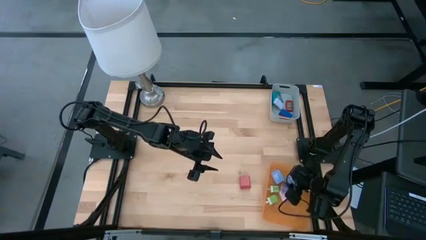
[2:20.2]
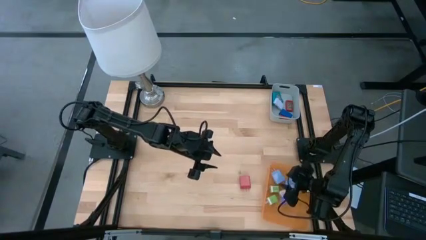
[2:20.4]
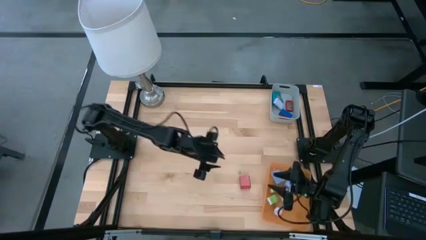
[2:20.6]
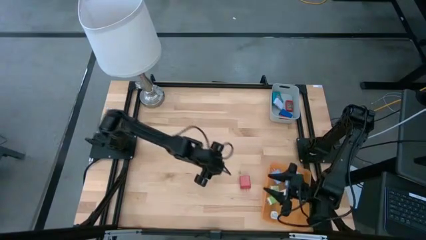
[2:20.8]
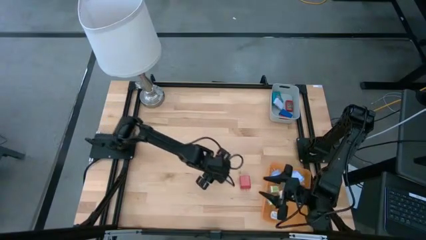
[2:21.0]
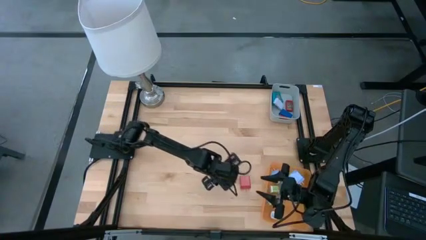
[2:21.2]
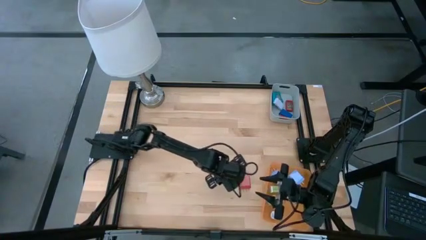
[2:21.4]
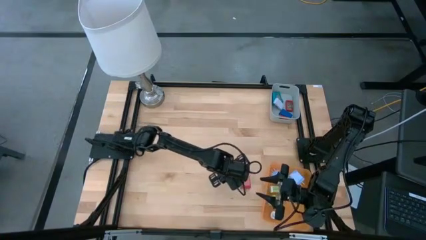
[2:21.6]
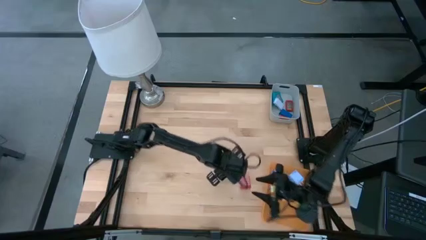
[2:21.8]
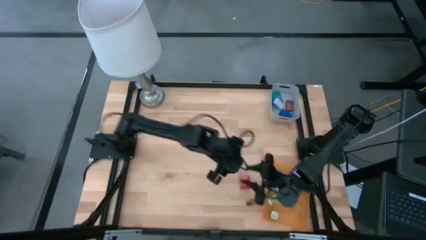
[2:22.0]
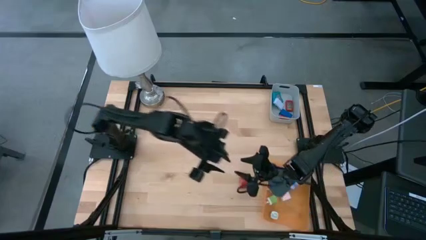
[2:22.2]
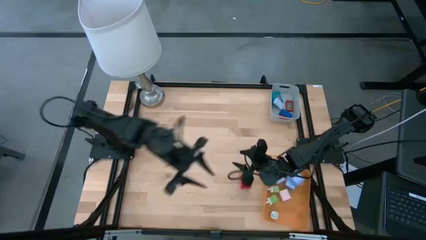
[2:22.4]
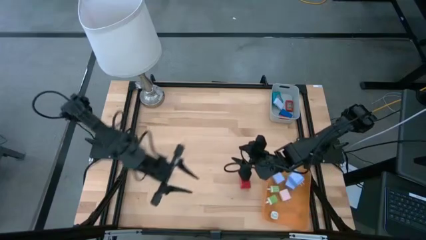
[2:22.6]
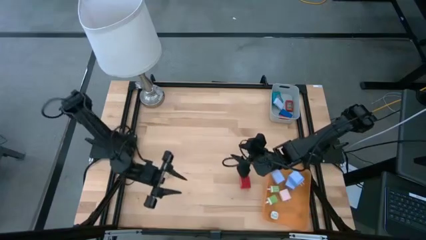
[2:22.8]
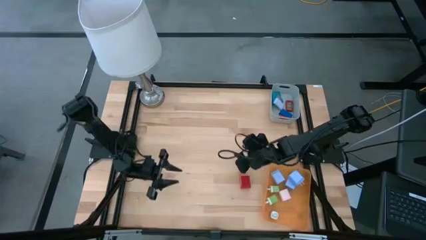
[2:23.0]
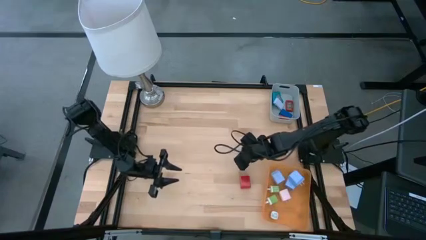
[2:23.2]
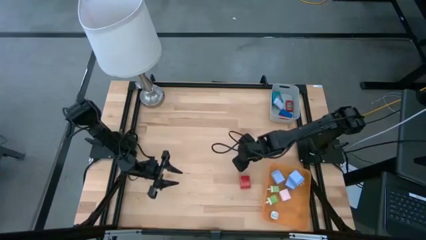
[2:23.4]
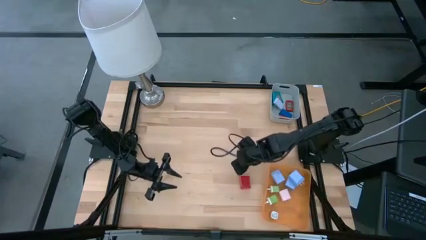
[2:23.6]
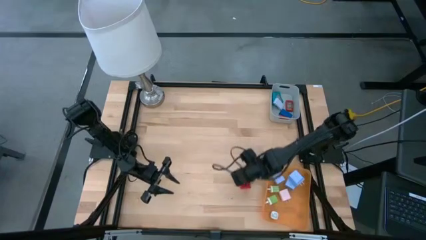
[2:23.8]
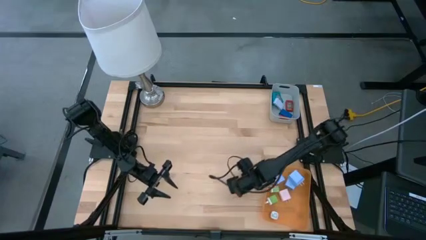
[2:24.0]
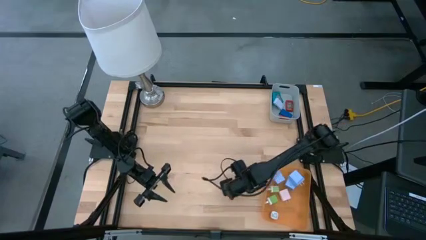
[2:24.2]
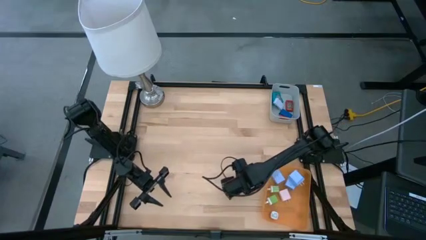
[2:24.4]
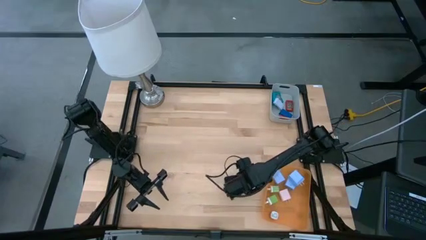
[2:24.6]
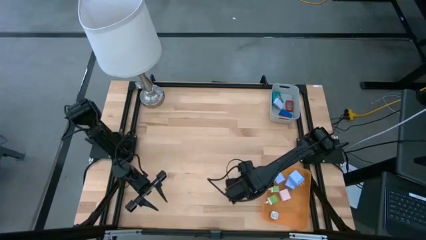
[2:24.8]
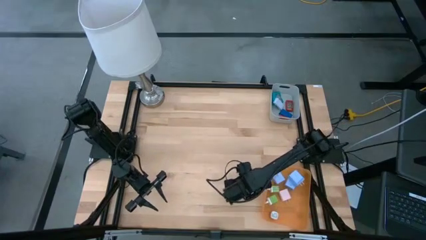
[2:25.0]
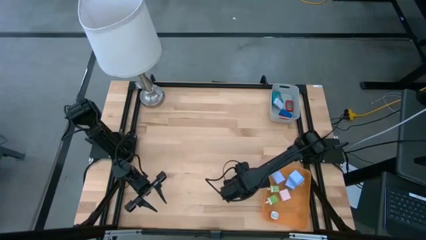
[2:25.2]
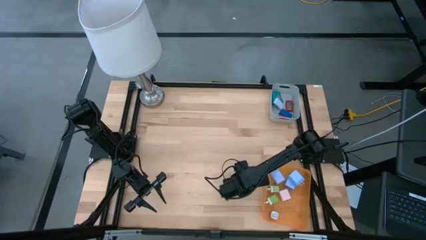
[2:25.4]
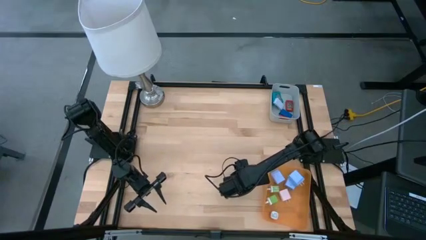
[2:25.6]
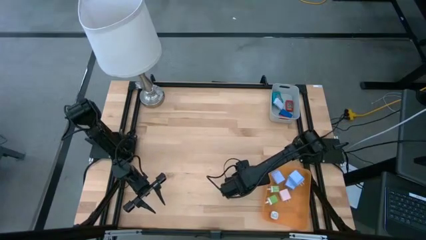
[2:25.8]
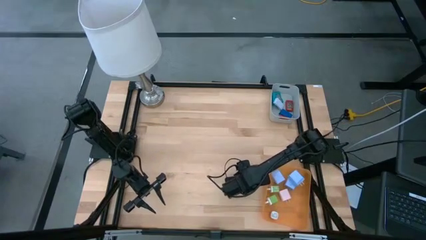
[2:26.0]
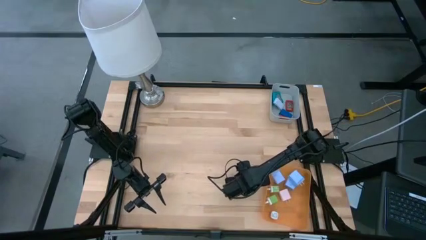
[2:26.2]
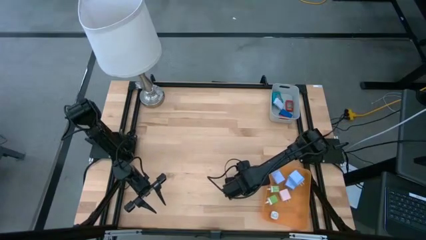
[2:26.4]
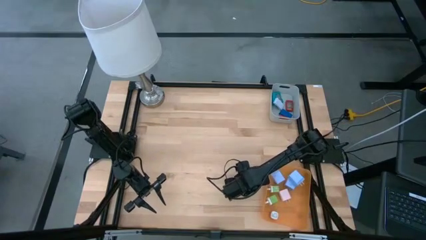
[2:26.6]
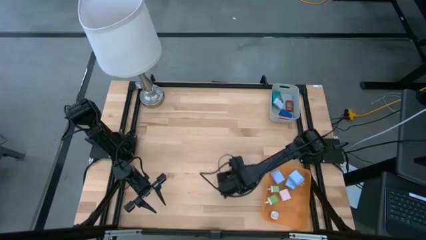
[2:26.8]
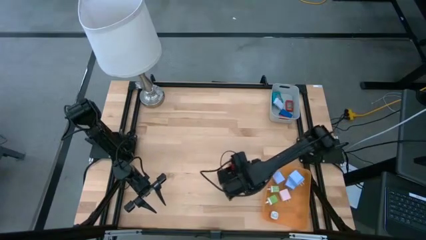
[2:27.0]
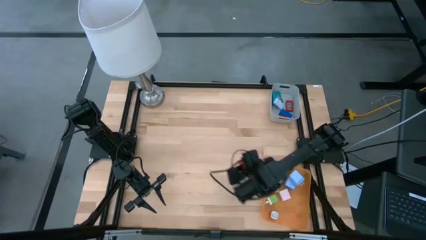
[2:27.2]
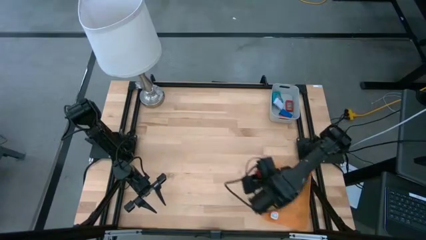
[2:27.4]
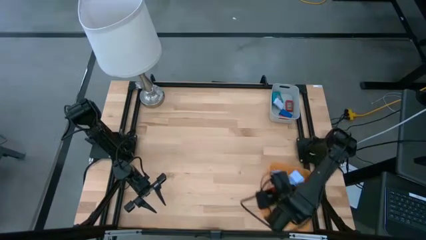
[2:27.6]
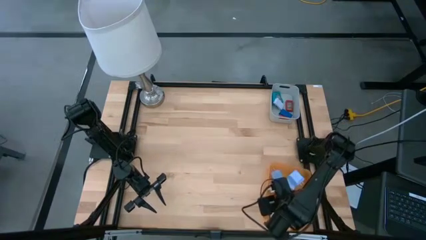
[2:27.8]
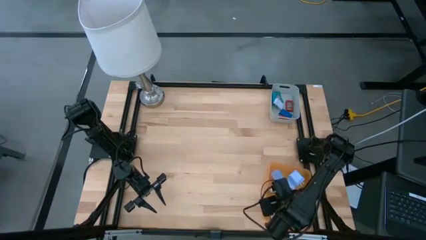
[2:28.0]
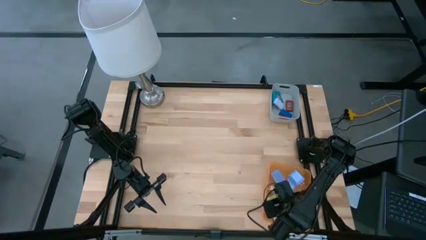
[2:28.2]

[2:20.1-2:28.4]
Task: Pick & Place Office items
Put the red charger adapter into the orange bin

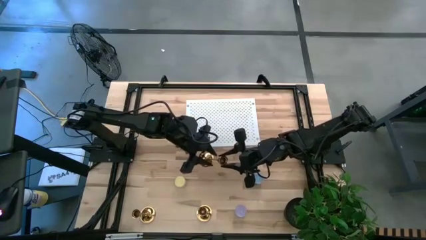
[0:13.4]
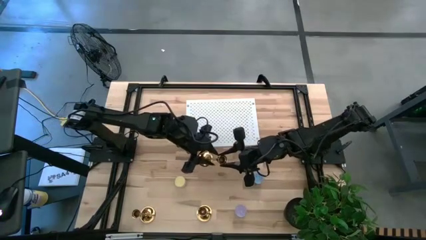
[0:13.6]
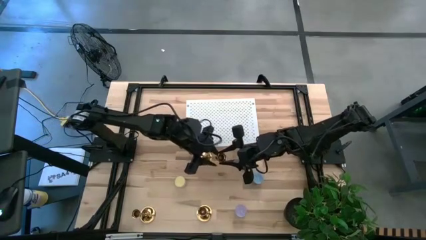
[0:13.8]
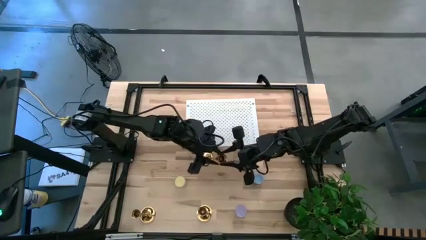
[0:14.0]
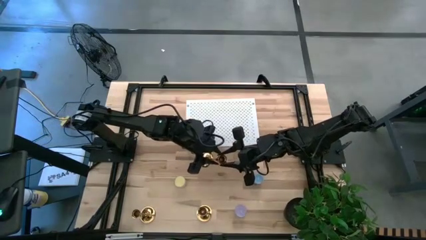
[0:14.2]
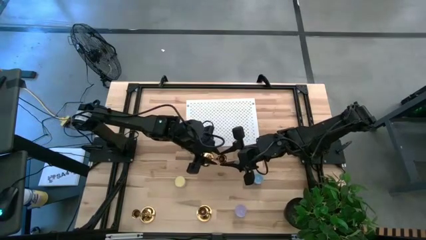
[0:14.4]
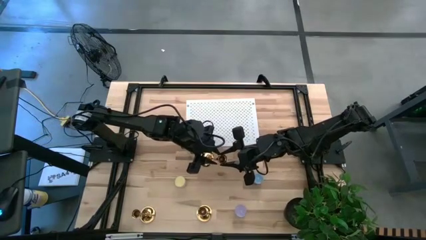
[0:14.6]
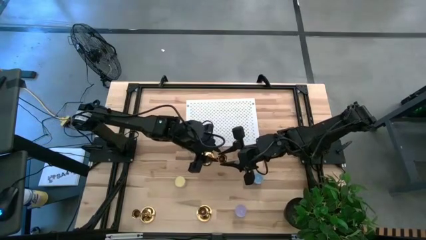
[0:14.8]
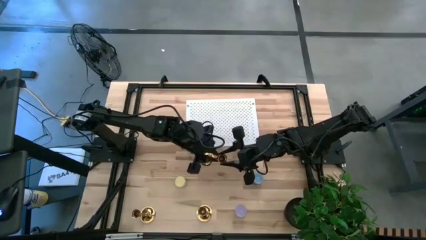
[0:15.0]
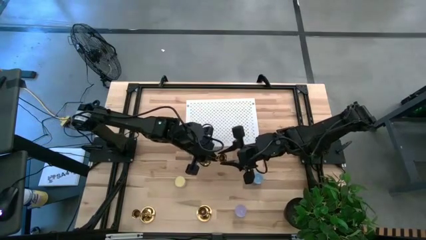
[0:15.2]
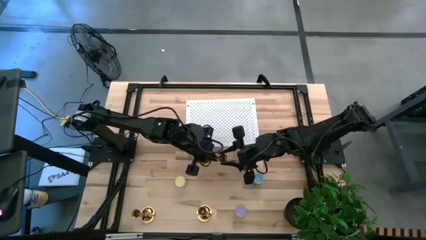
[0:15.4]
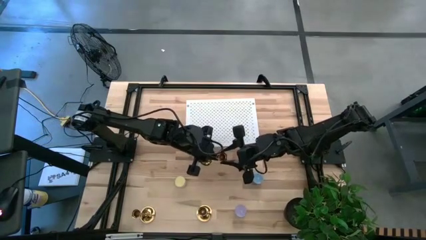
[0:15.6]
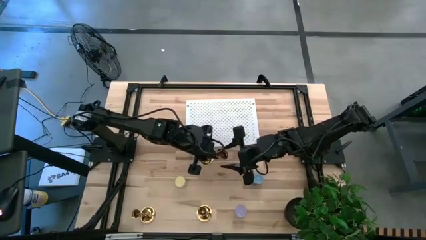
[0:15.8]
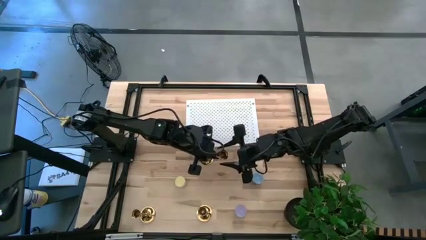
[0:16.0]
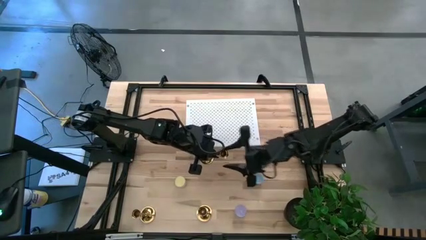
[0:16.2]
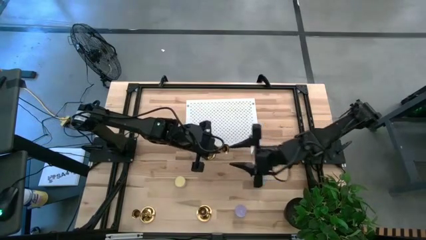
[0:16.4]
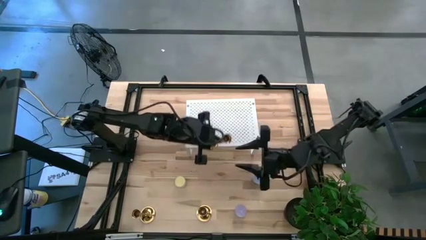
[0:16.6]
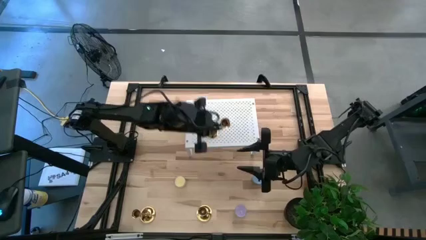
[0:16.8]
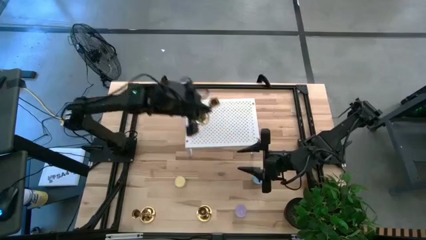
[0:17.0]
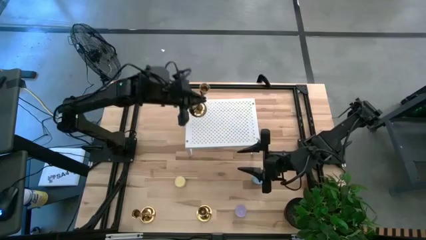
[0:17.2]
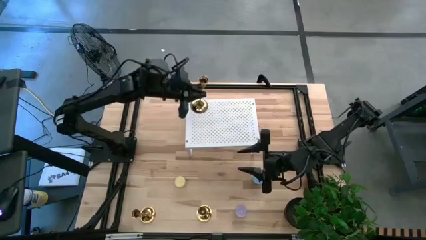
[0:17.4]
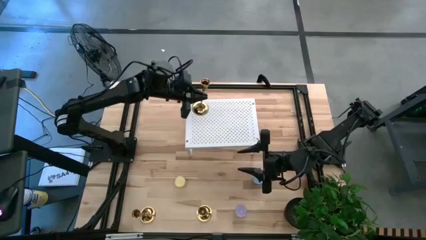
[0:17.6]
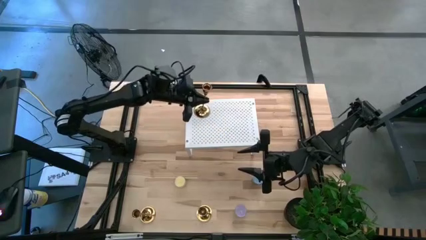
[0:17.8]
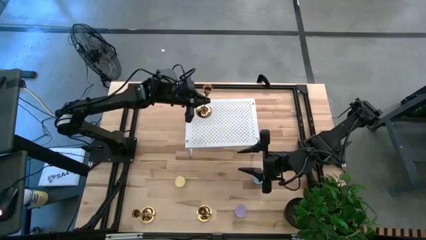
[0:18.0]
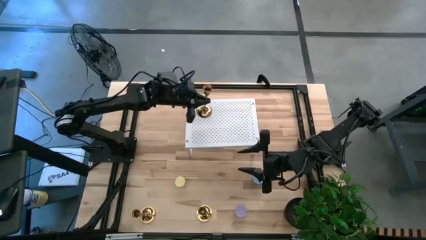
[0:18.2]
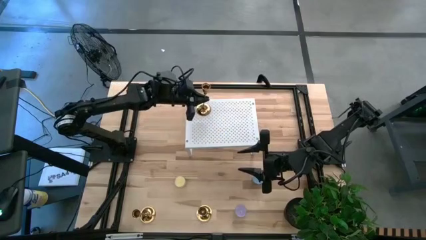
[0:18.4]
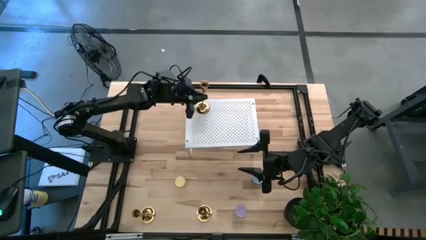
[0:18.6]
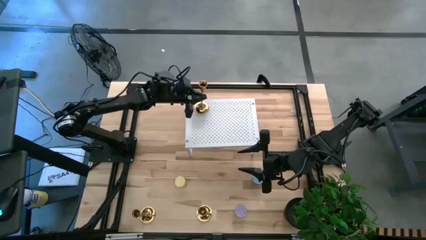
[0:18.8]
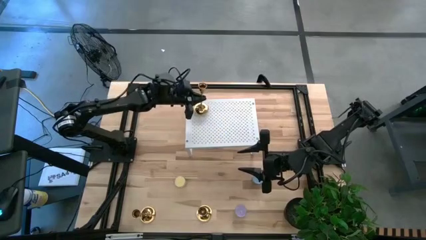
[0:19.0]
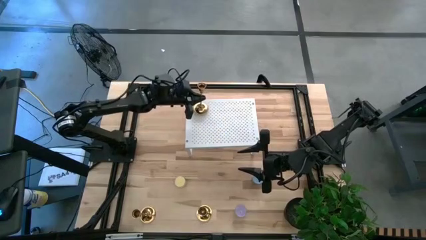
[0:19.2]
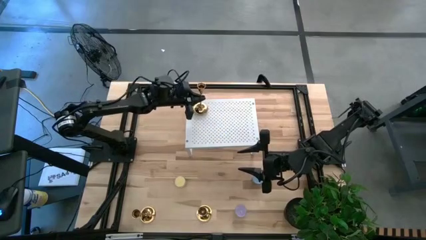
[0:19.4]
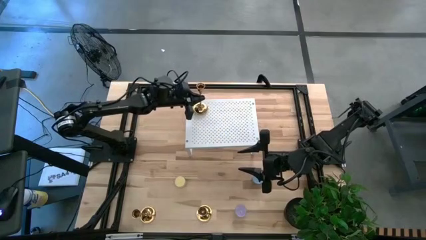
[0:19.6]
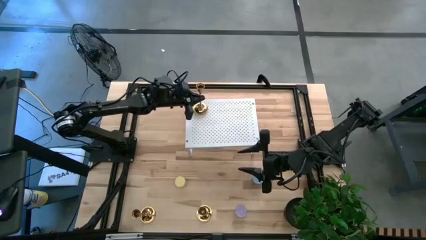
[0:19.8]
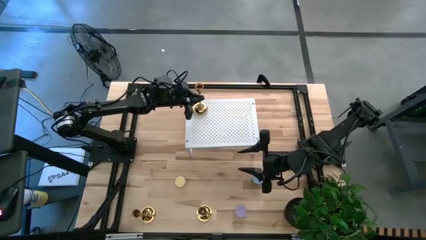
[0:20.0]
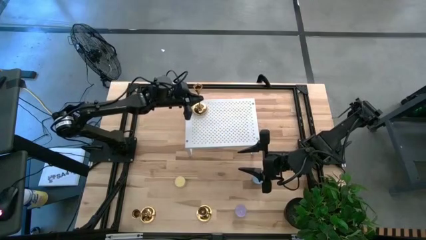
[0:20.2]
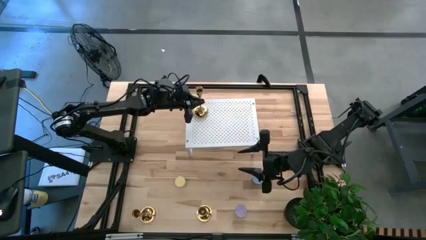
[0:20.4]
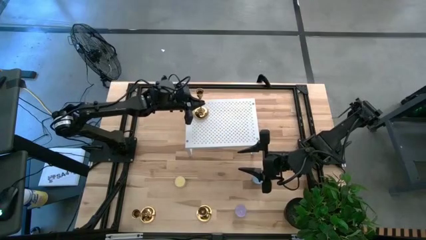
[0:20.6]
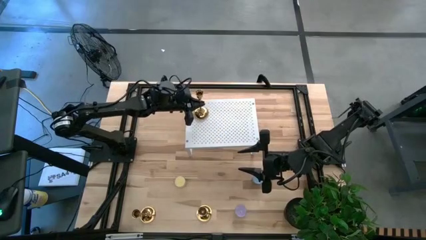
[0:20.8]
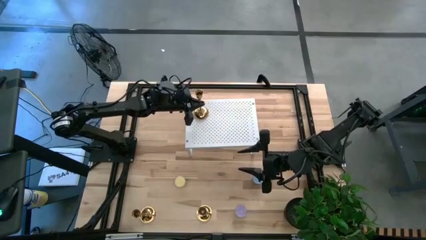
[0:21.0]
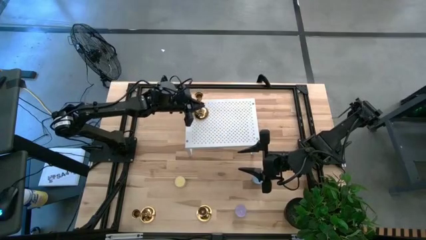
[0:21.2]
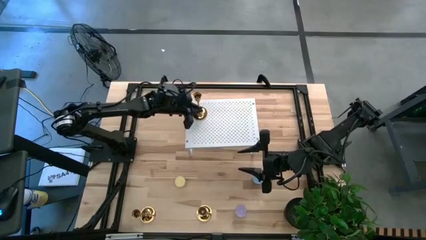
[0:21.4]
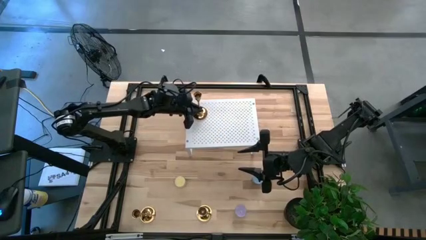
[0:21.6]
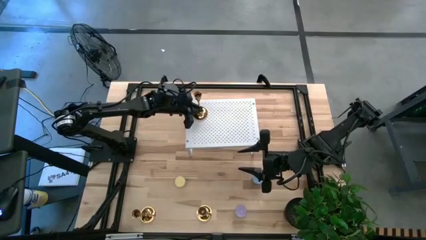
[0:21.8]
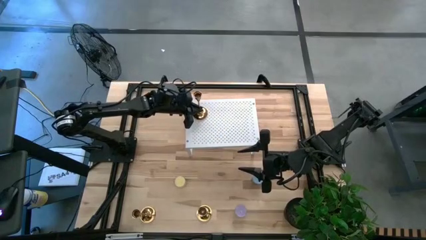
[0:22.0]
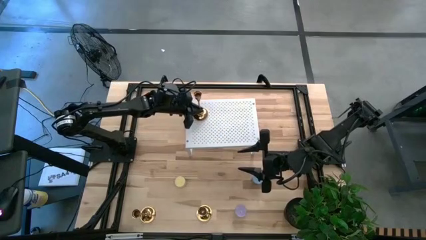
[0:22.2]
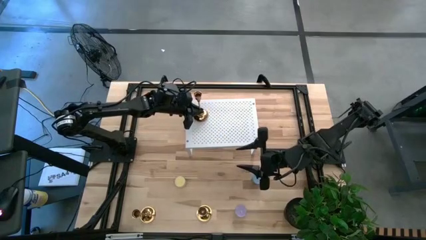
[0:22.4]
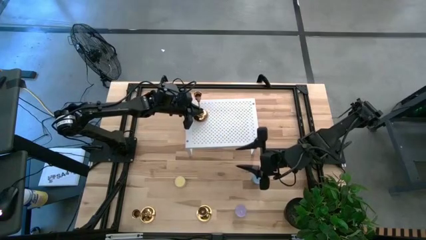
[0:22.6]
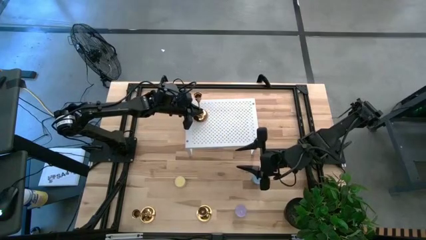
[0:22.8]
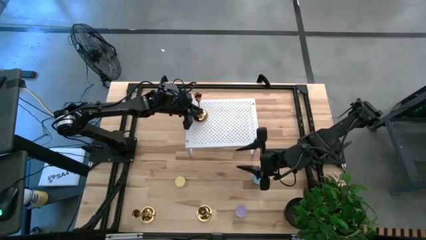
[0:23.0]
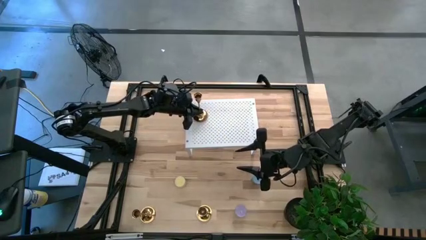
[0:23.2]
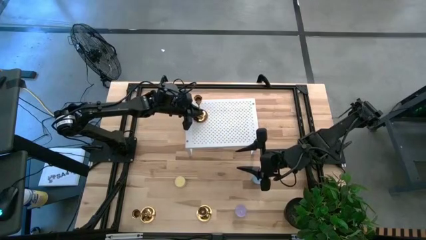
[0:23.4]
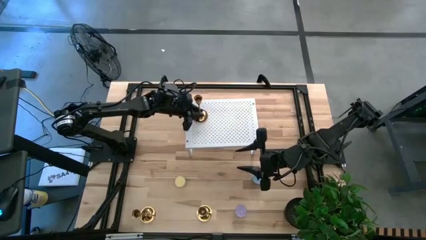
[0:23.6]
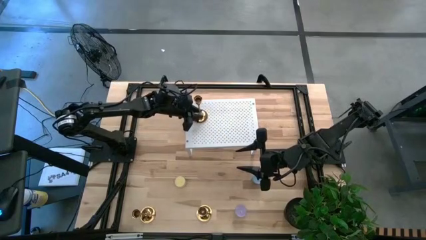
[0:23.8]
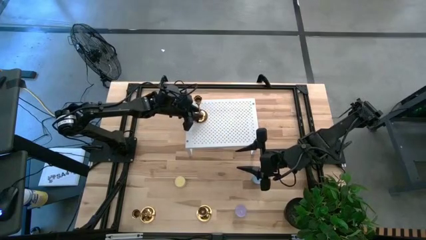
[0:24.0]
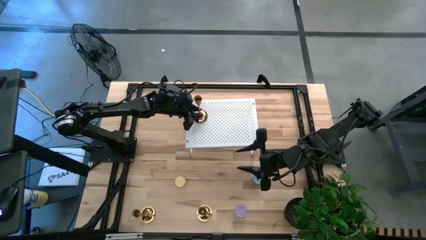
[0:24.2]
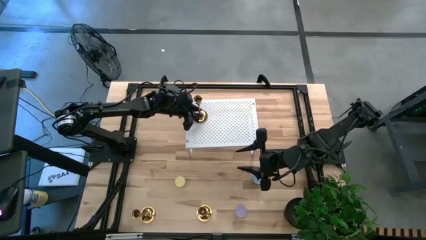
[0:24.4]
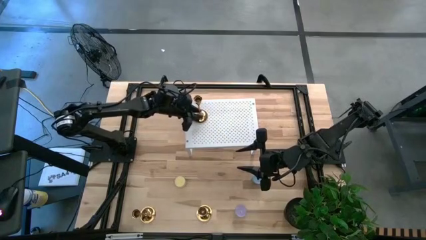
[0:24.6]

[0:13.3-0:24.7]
Task: Pick & Place candle stick holders
Put the top yellow candle holder on the shelf
